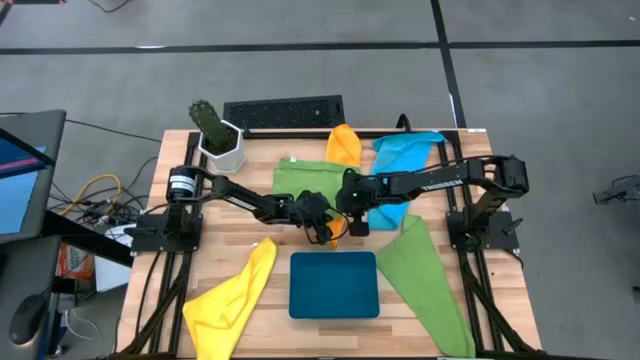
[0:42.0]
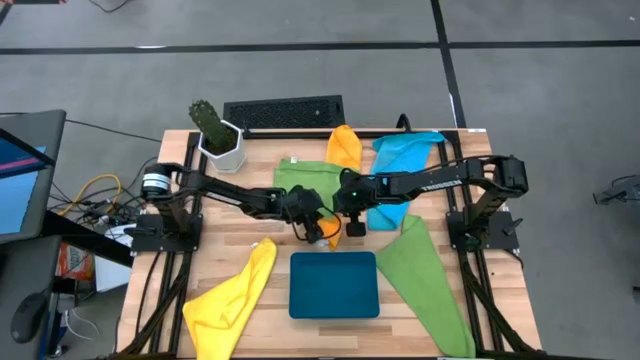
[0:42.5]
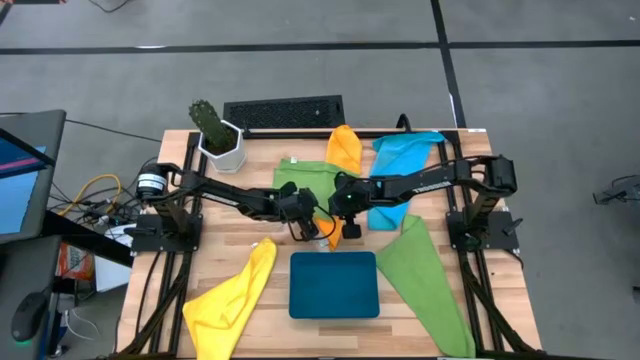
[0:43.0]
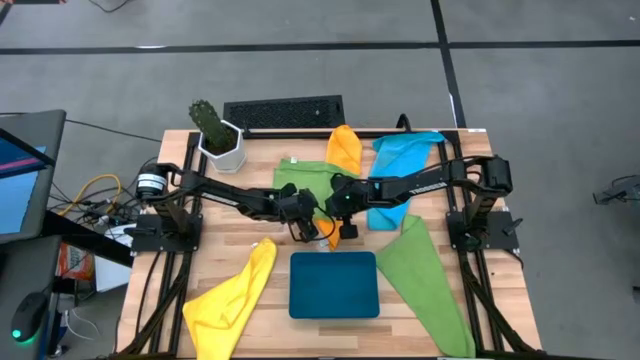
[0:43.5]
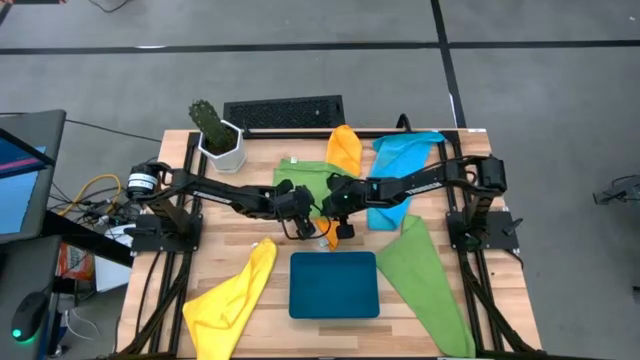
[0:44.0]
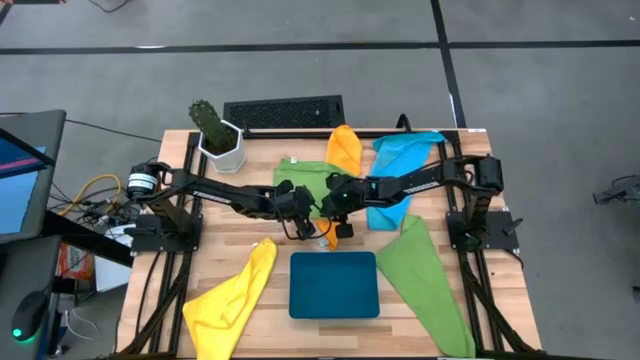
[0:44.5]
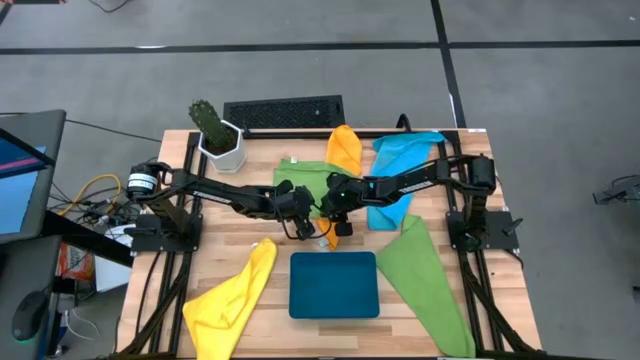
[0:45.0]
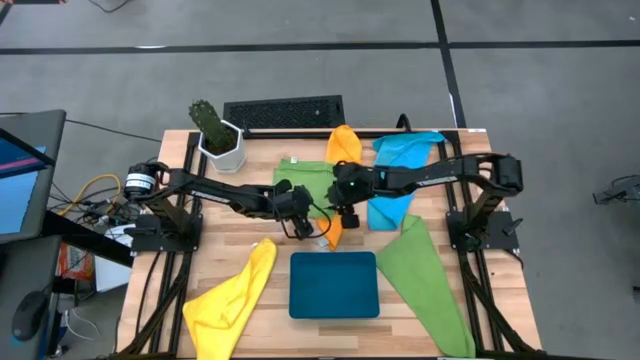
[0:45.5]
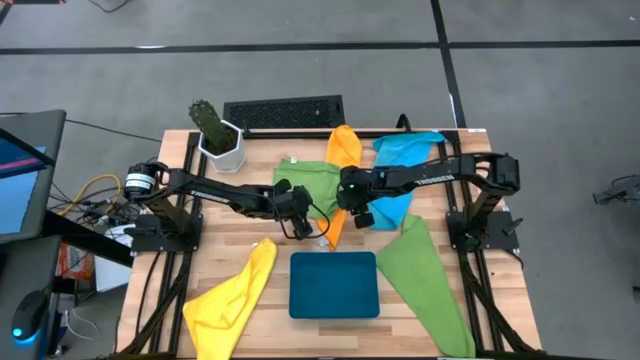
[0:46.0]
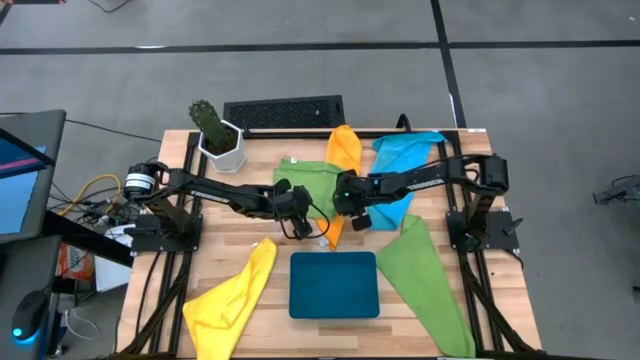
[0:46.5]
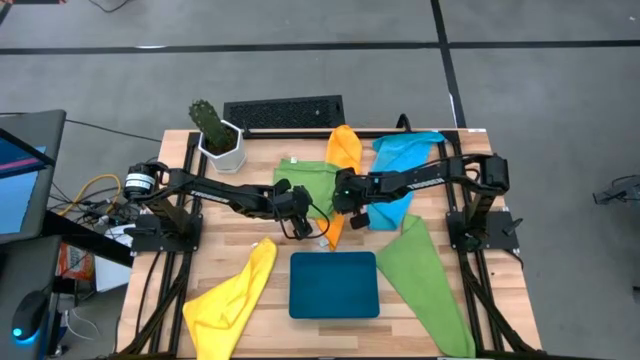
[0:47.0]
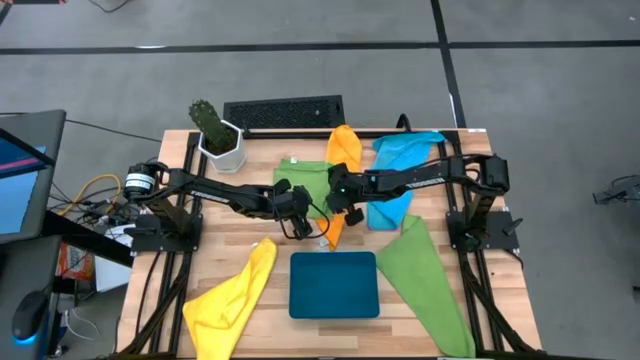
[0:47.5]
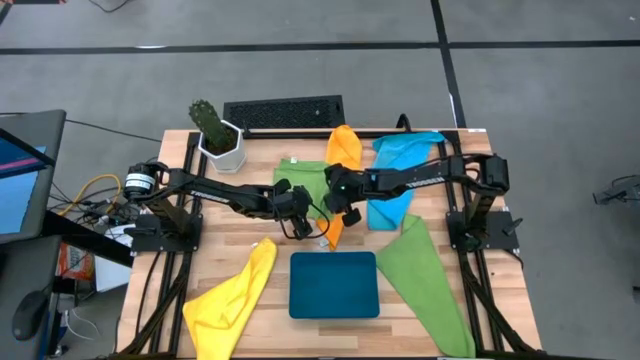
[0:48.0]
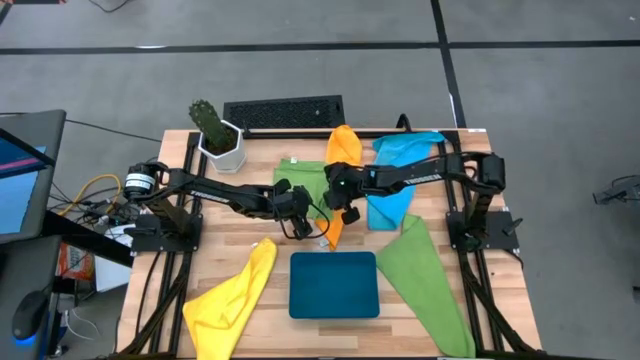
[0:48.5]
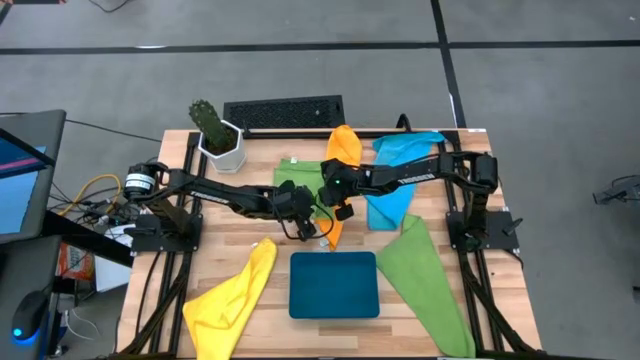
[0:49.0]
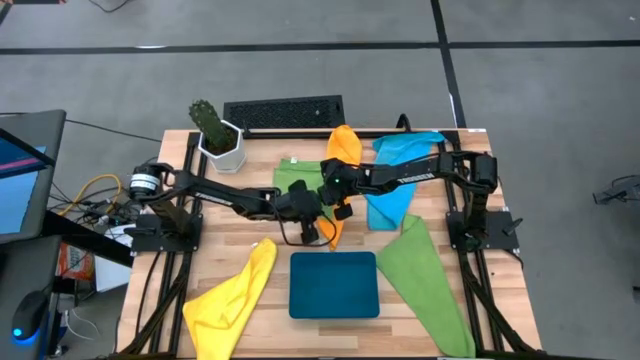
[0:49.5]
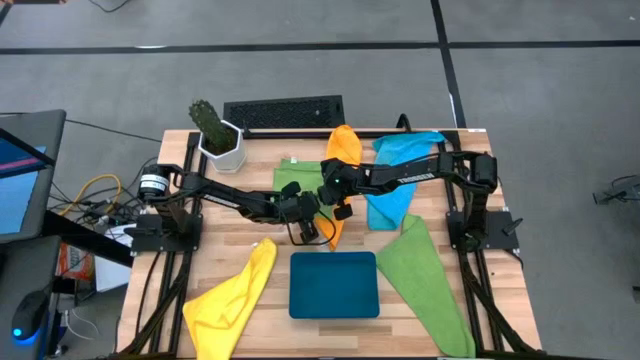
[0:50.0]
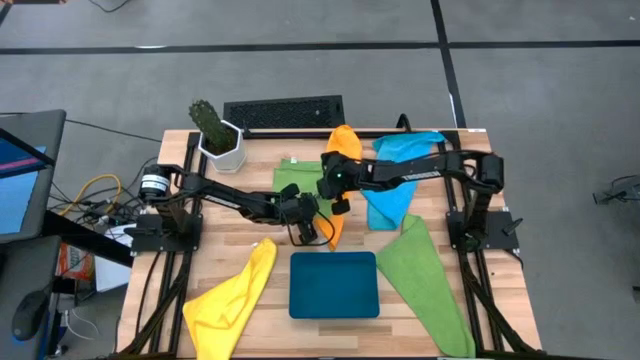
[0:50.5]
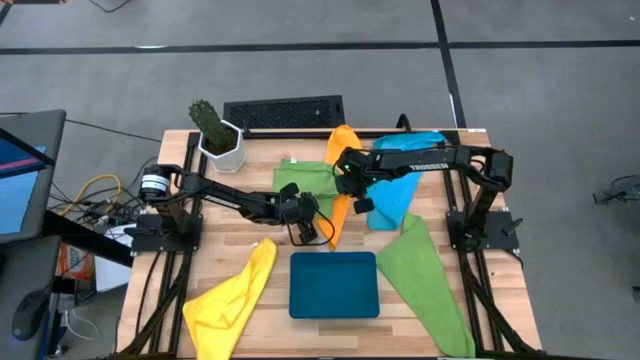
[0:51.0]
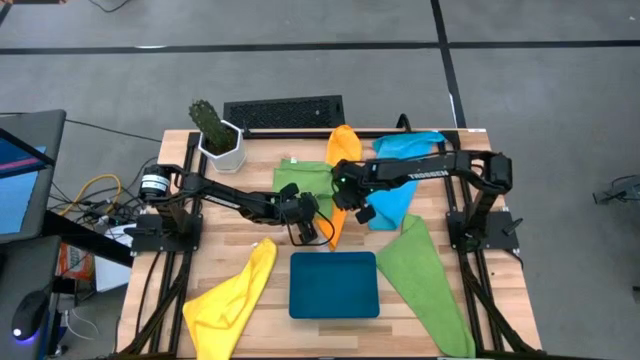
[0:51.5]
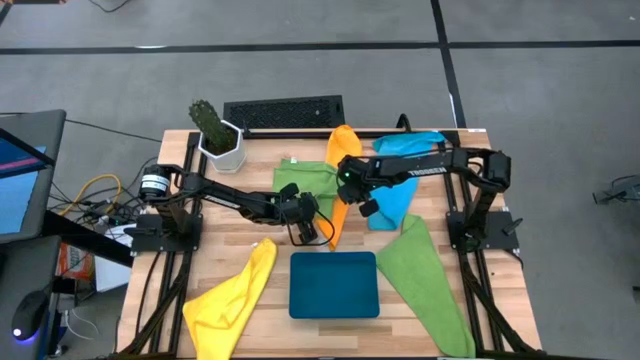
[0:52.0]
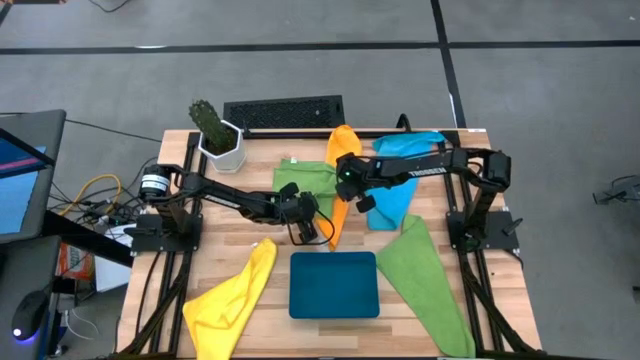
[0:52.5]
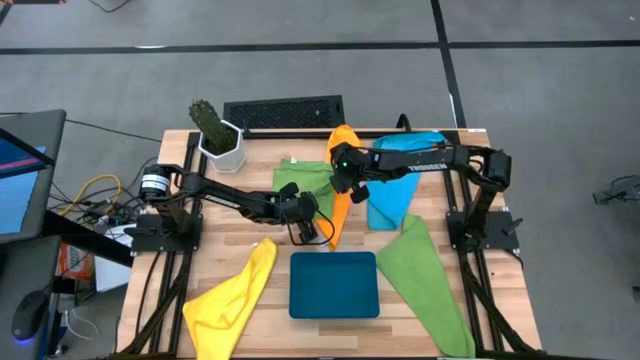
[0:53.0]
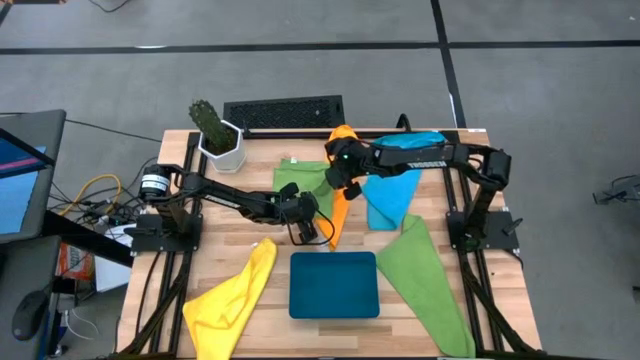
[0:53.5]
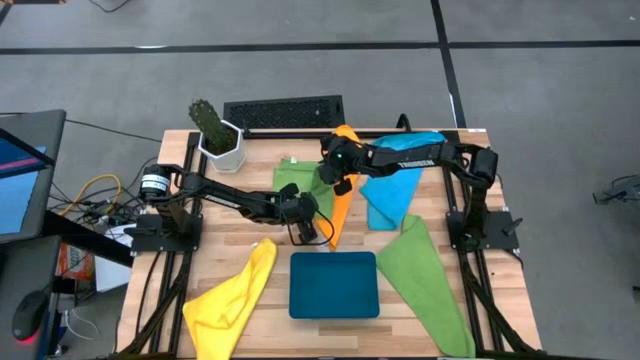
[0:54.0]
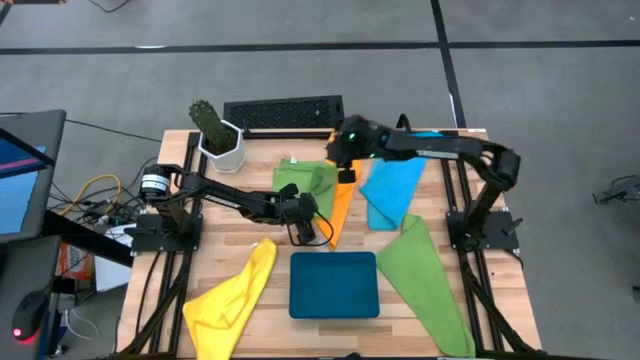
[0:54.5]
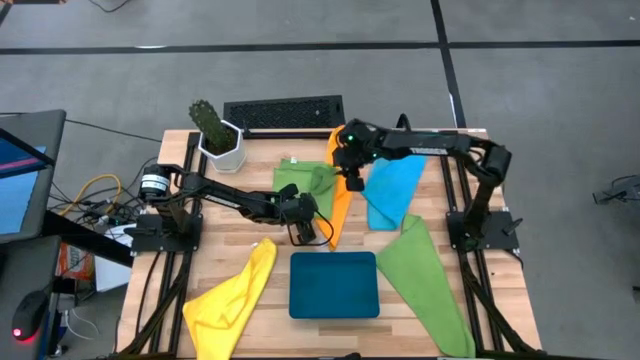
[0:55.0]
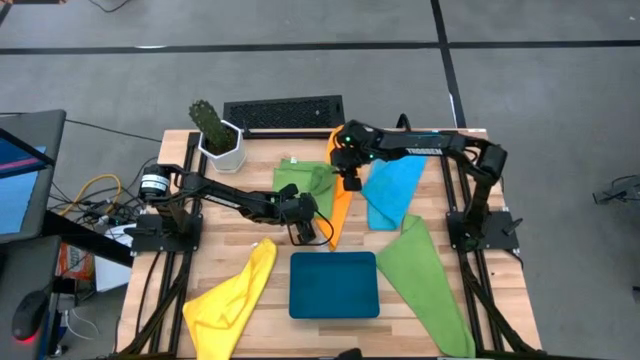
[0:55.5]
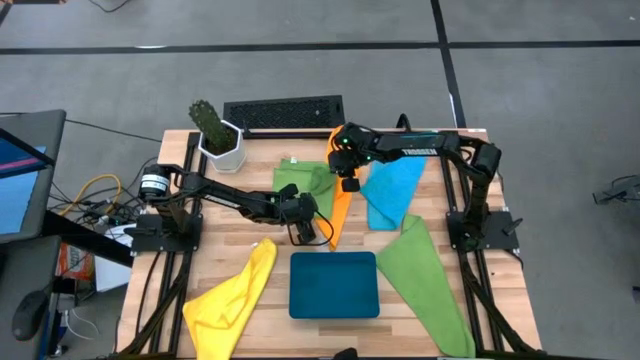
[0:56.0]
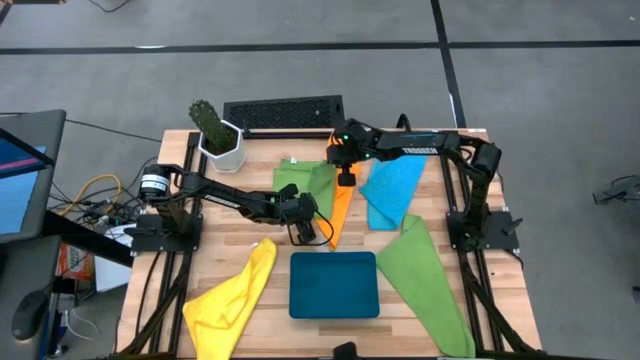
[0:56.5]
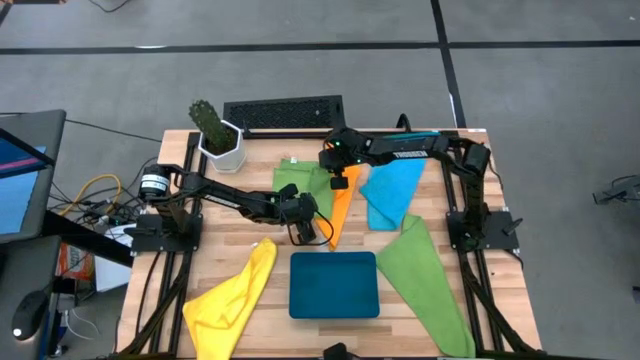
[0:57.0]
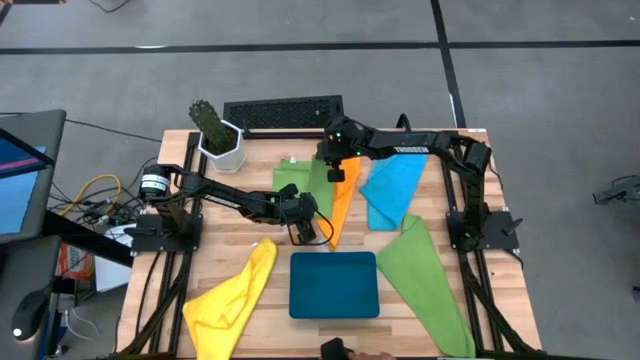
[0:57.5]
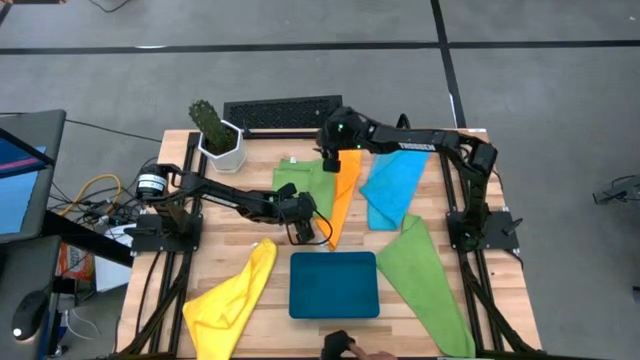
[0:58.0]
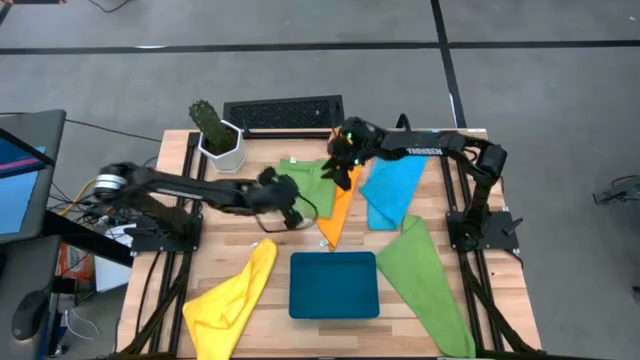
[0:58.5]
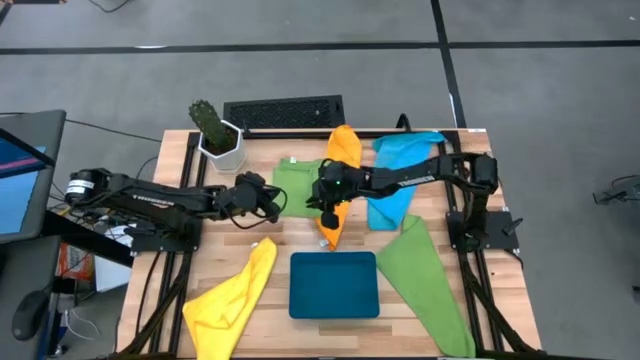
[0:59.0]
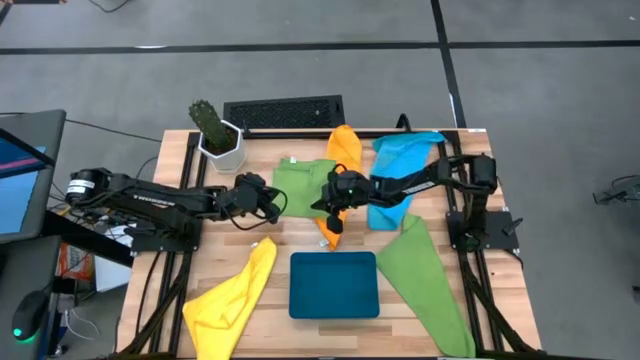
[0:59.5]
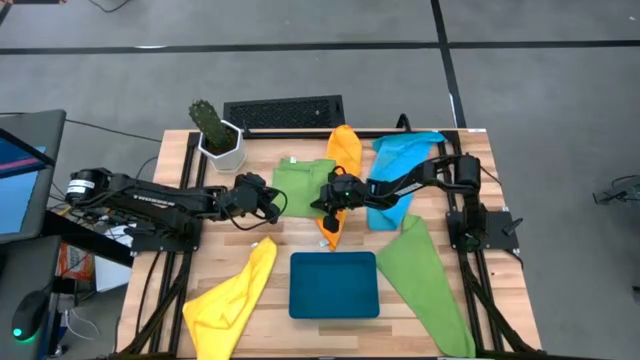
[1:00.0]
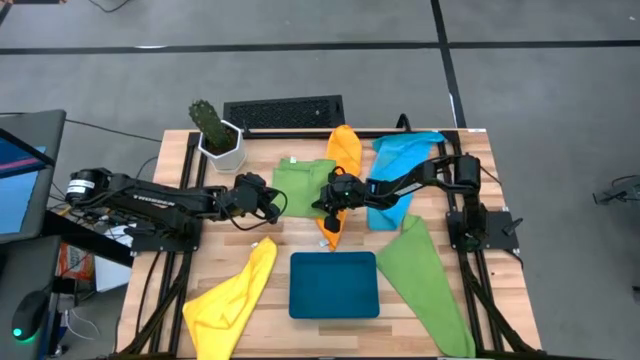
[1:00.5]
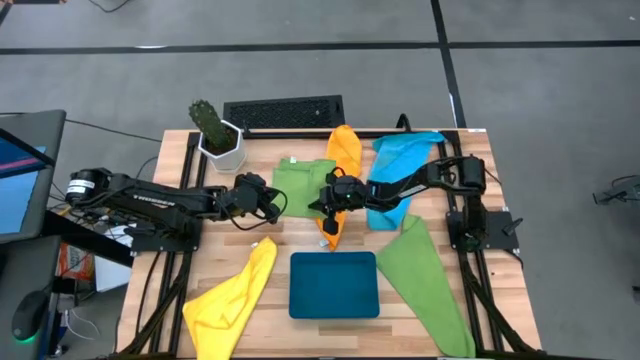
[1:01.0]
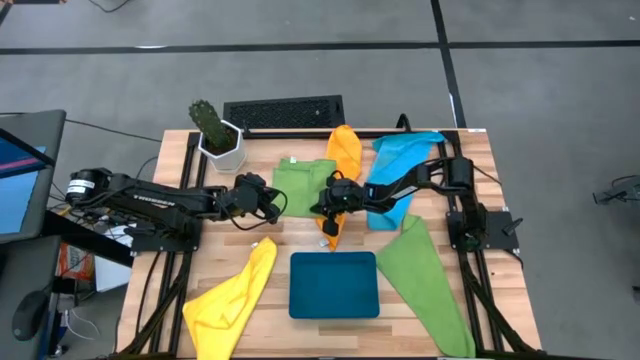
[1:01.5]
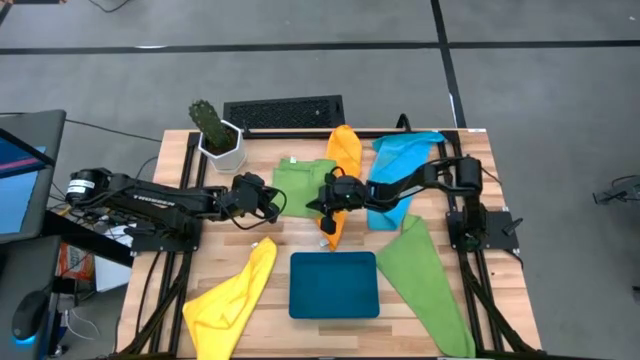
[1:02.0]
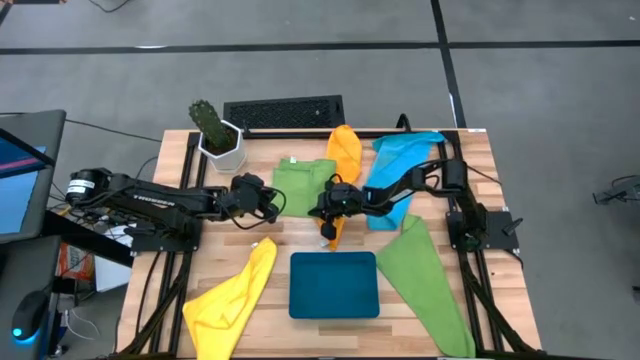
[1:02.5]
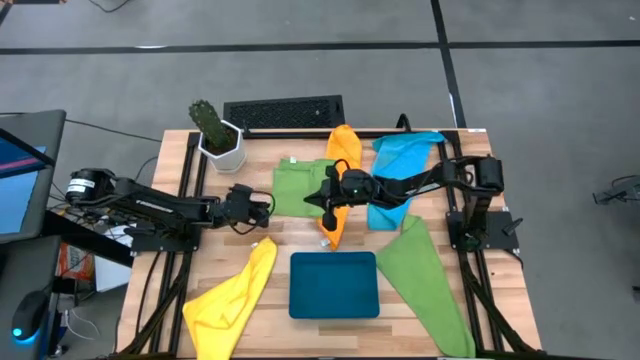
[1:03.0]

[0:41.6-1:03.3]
Task: Fold microfiber towels
Fold the top green microfiber towel
